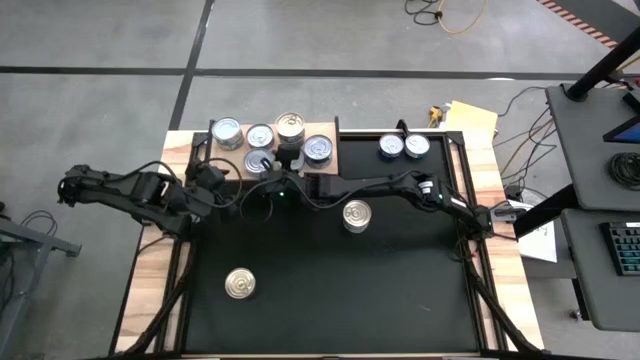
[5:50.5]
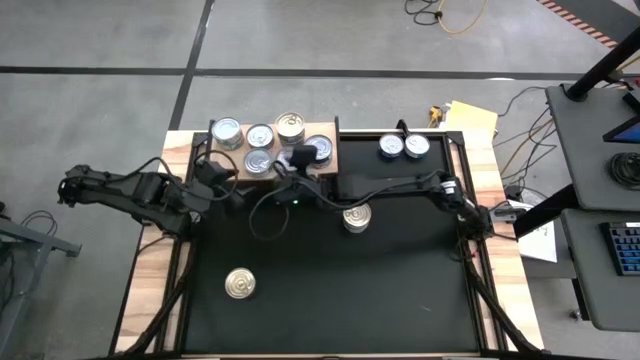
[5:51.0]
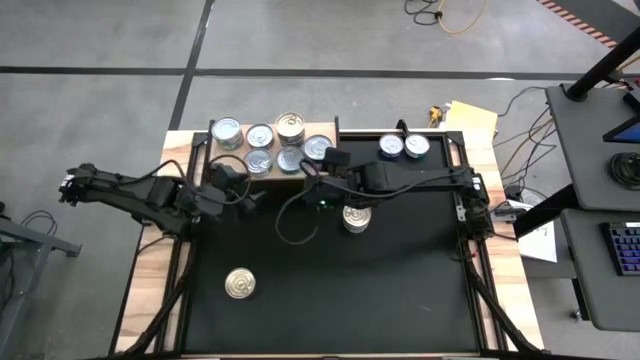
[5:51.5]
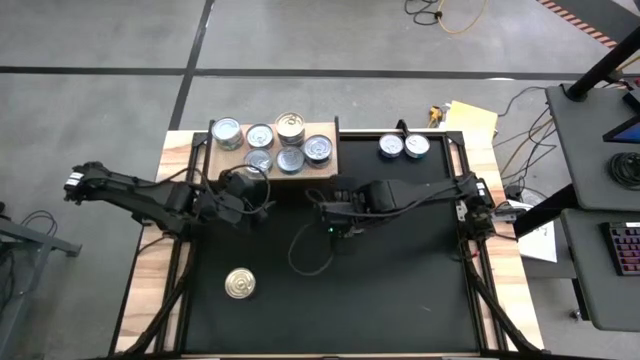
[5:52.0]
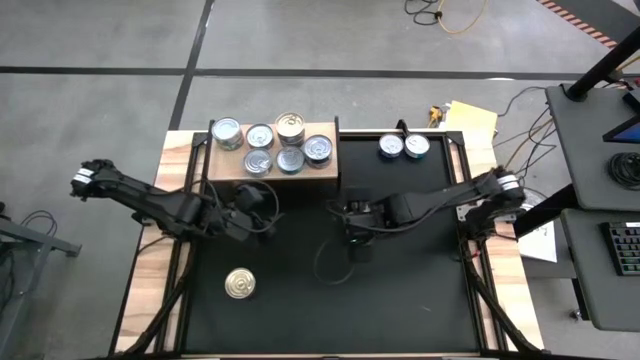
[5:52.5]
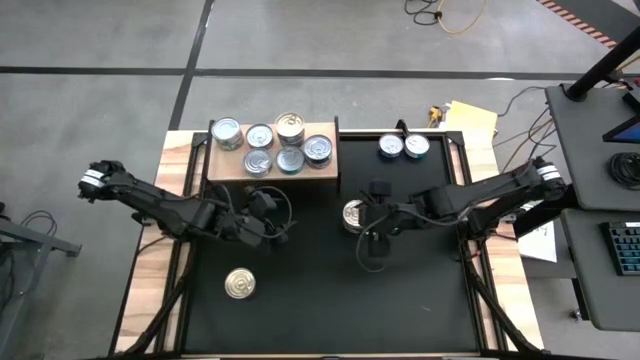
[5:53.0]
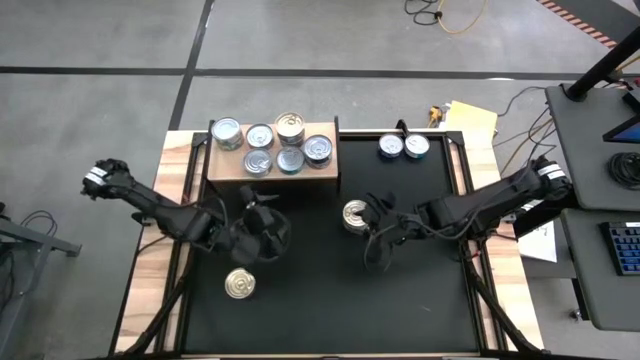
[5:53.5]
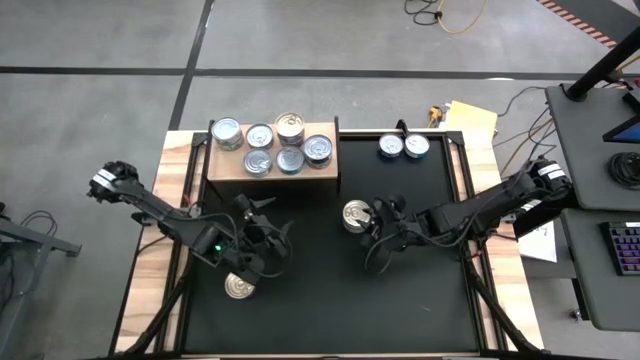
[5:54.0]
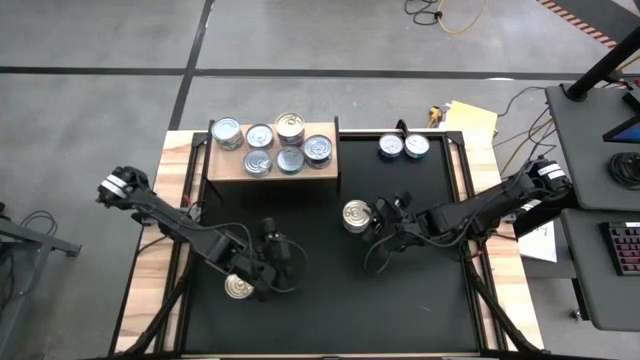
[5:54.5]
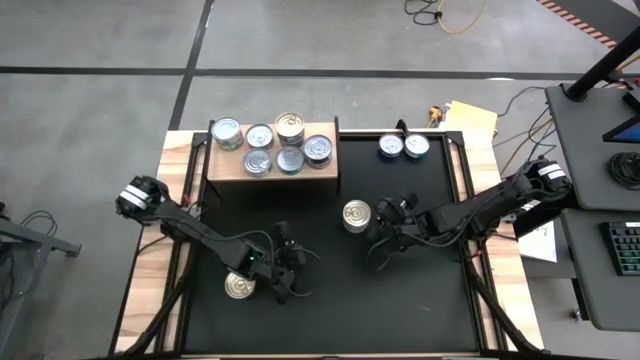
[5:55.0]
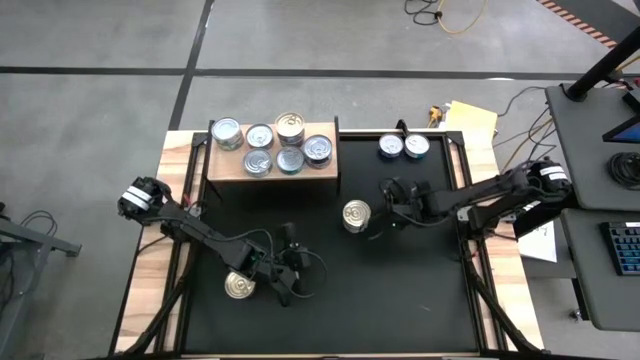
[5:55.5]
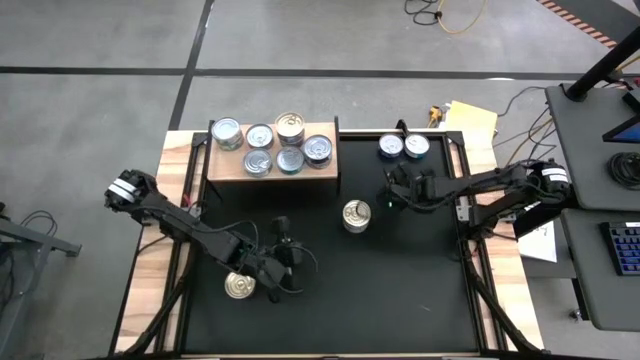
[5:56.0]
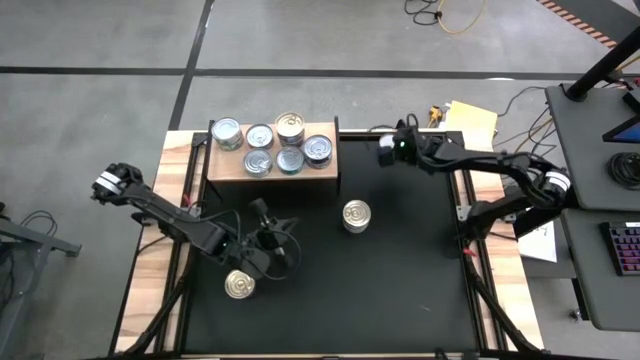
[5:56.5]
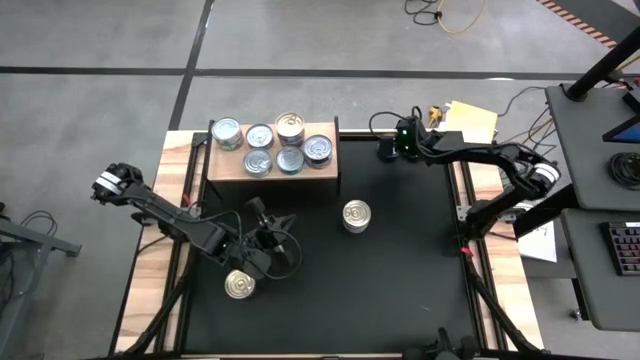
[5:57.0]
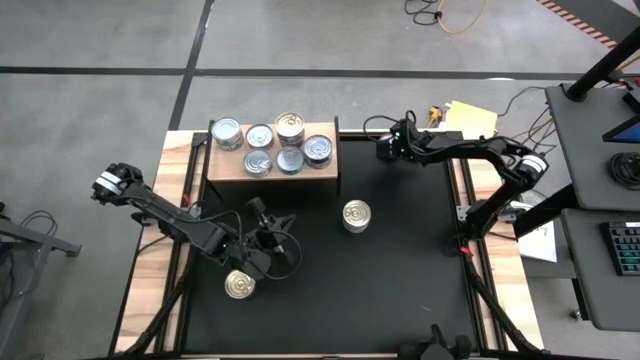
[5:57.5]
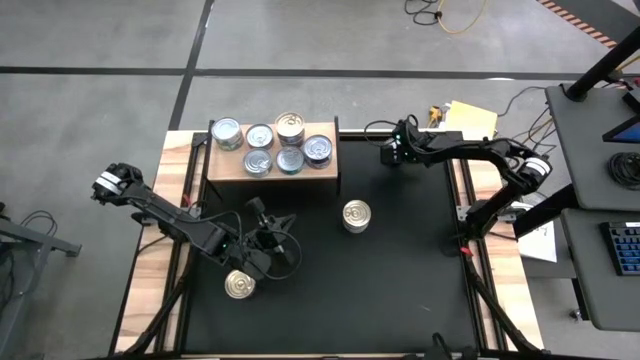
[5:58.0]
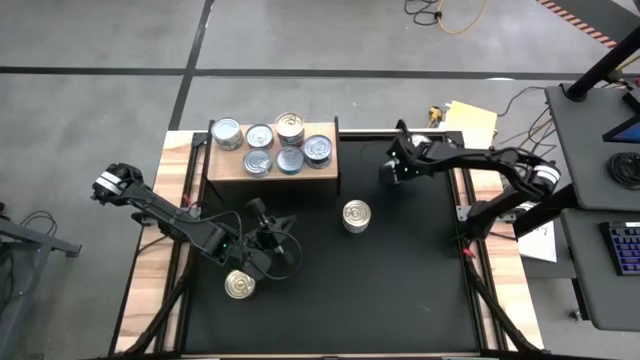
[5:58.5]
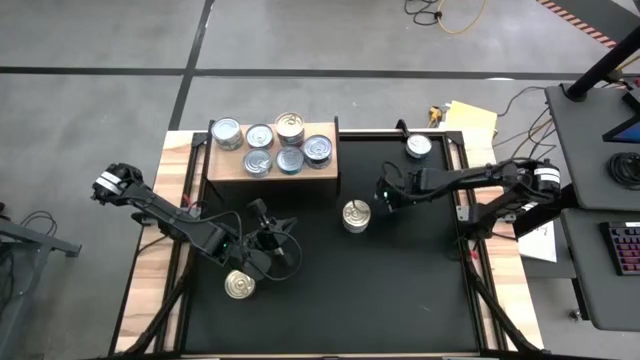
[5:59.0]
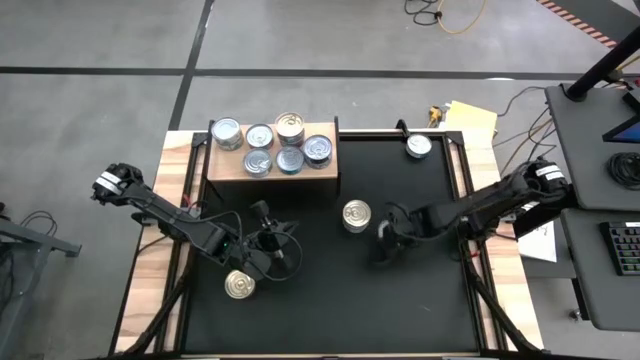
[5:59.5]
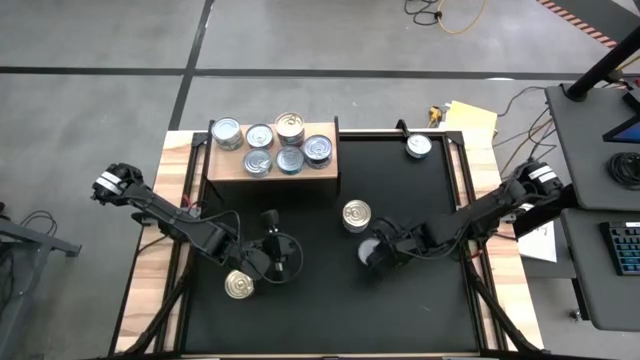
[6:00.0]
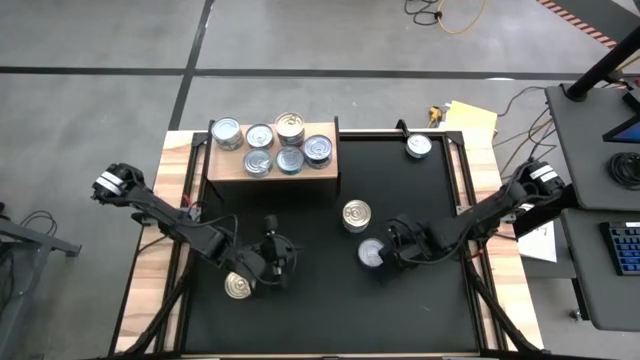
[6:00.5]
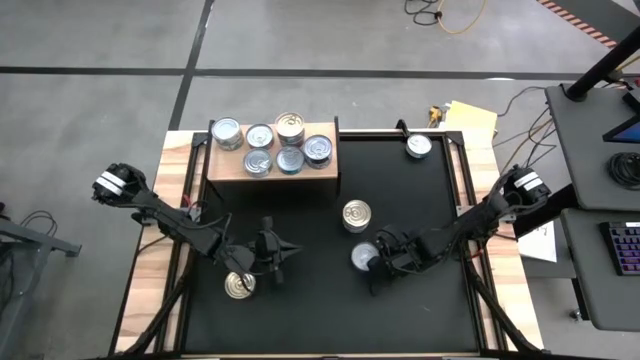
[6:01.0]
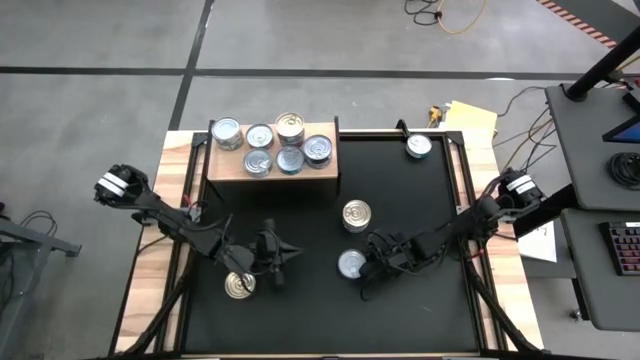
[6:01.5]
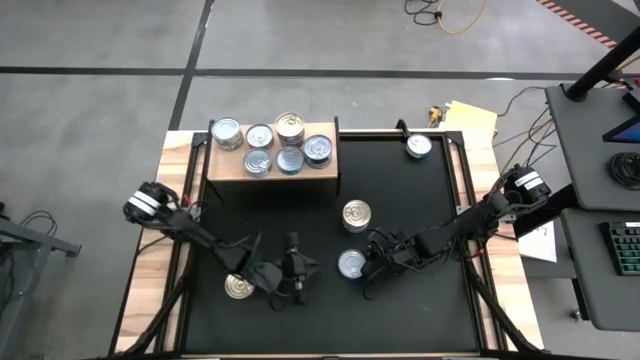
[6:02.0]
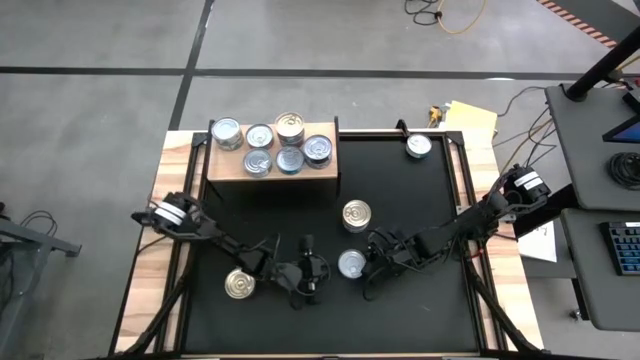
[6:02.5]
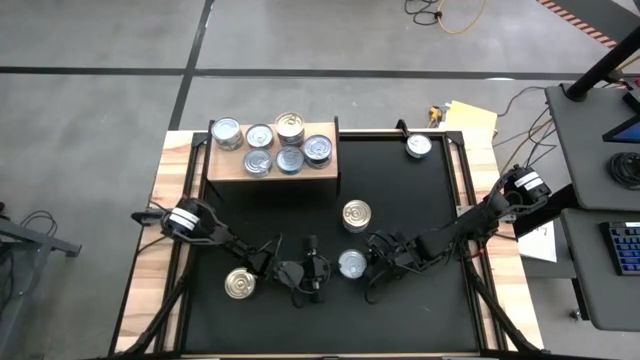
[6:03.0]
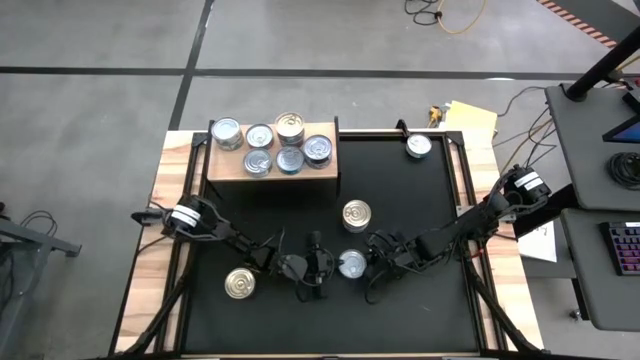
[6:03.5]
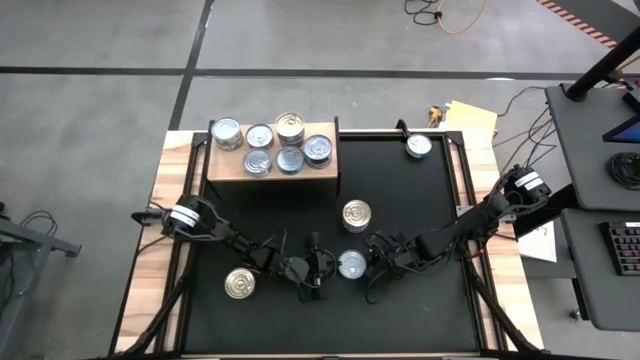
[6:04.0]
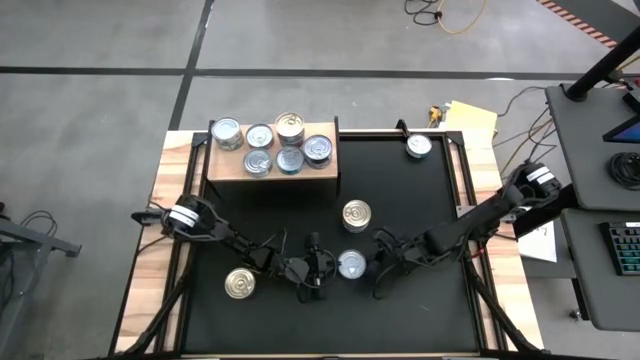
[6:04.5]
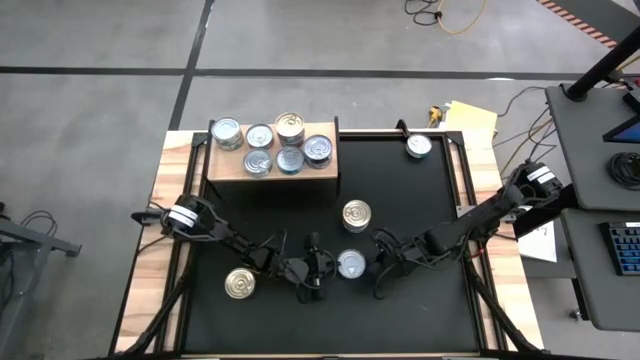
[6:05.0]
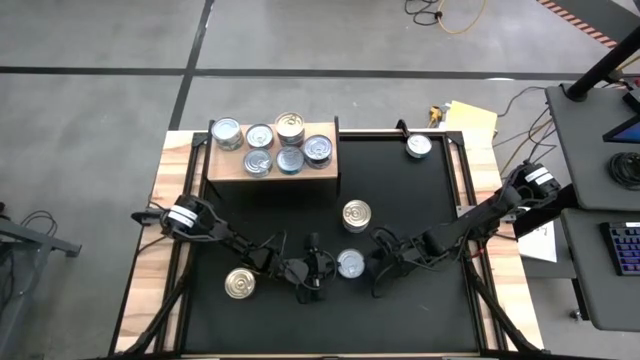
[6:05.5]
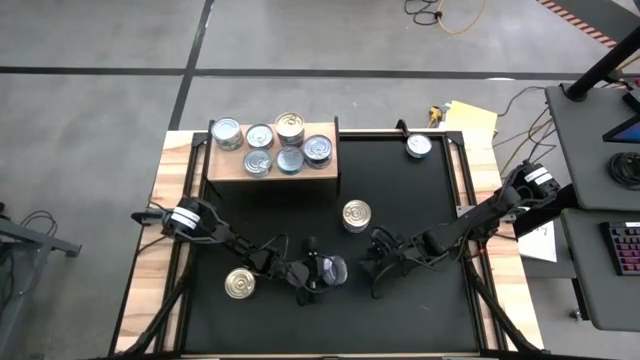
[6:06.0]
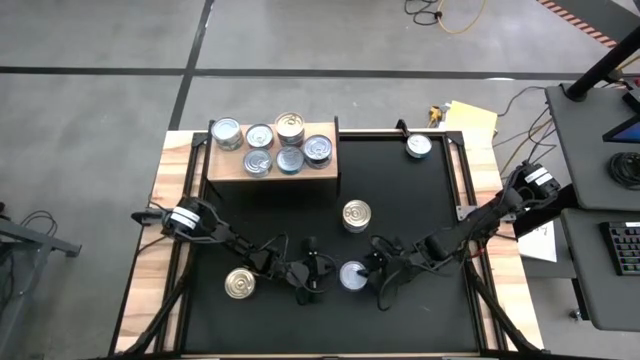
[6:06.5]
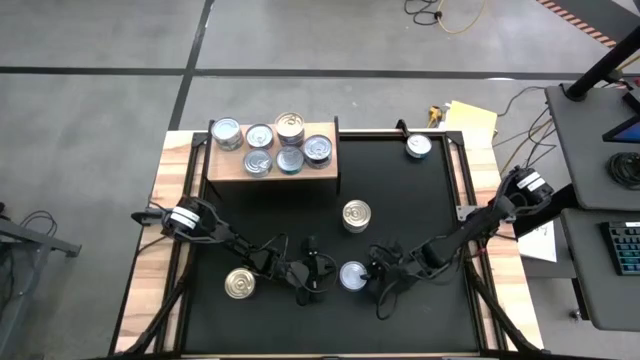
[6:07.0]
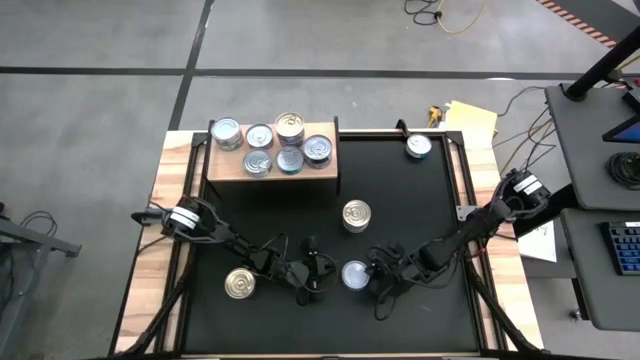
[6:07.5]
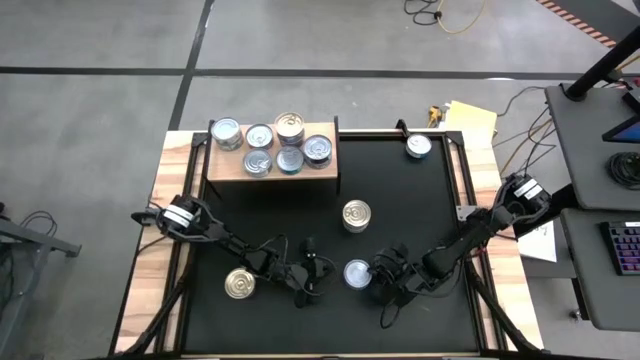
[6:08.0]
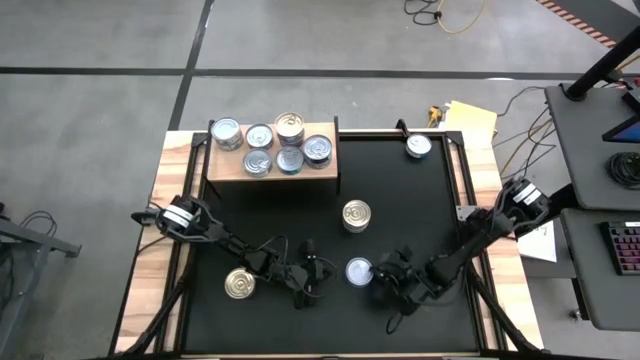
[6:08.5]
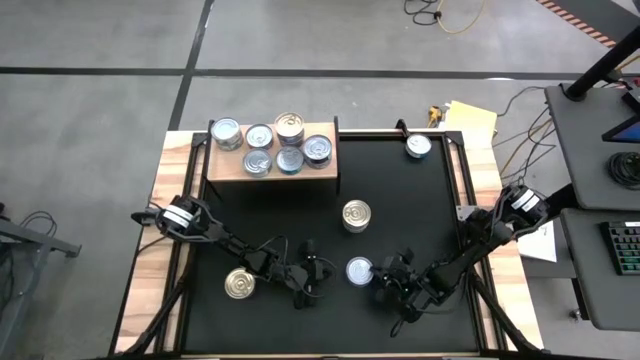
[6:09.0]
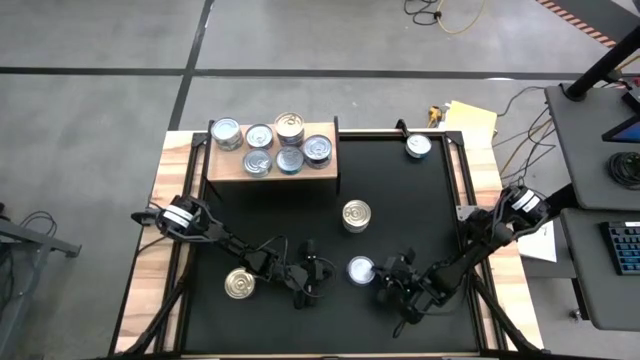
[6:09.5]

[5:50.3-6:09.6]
Task: Stack canned seafood by type on shelf
Stack the blue tuna can on top of the blue tuna can on the shelf

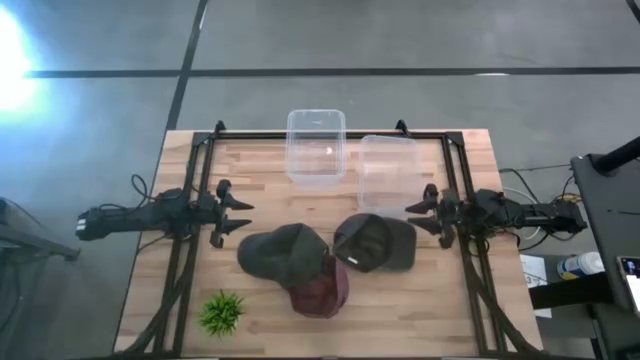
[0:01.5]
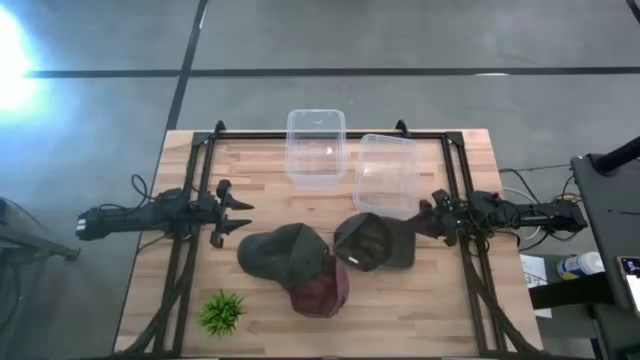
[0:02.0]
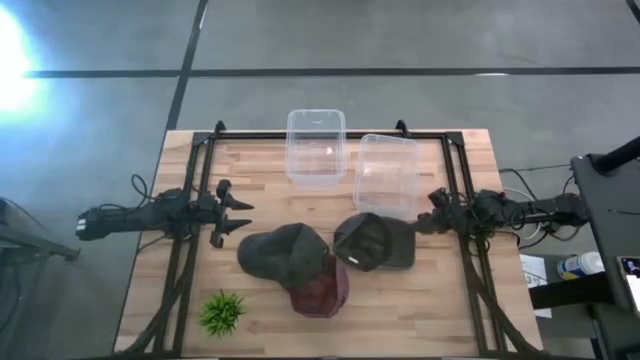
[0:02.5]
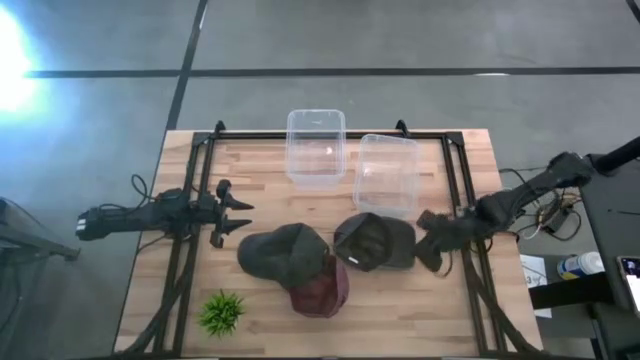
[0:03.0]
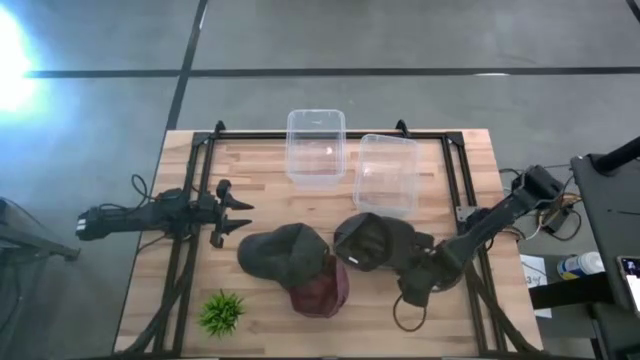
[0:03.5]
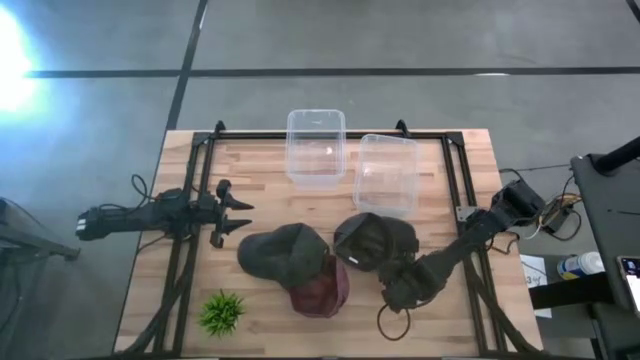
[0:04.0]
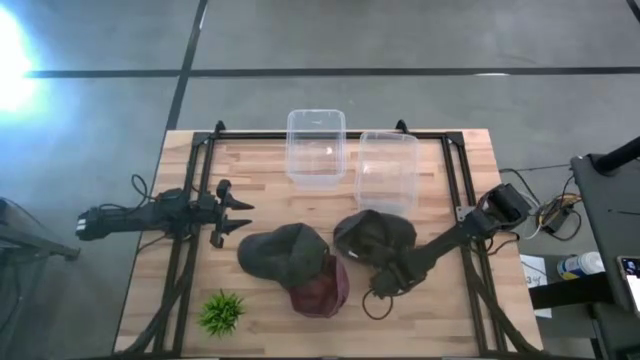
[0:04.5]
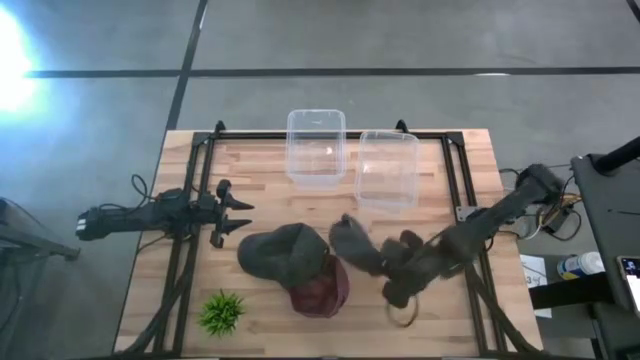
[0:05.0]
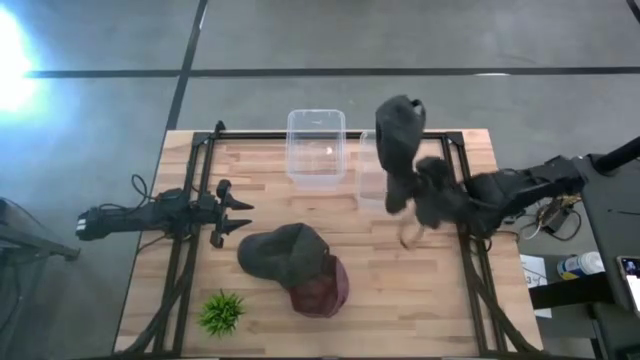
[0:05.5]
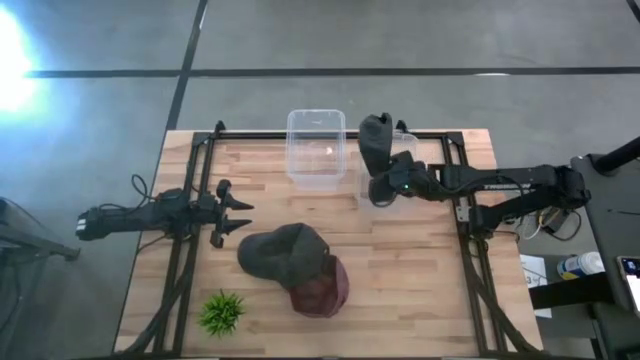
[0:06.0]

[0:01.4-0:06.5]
Task: Pick & Place hat
Put the right black cap into the right transparent bin
